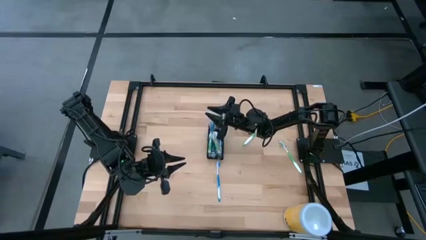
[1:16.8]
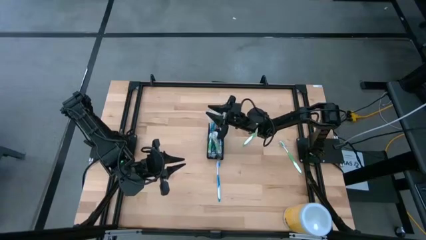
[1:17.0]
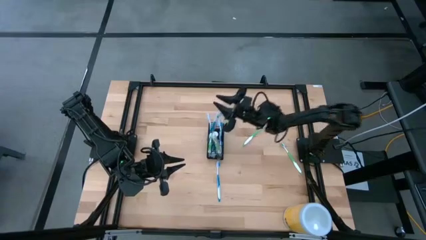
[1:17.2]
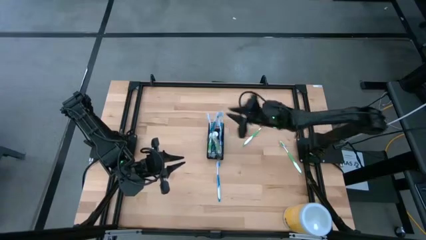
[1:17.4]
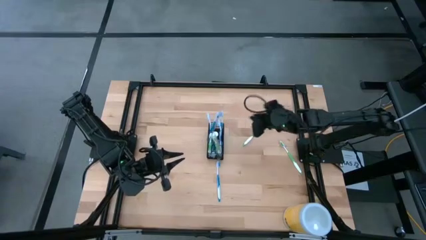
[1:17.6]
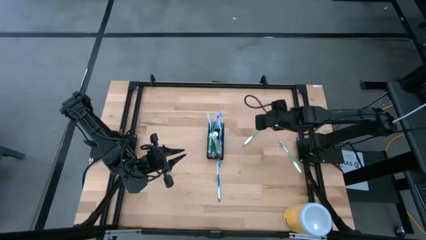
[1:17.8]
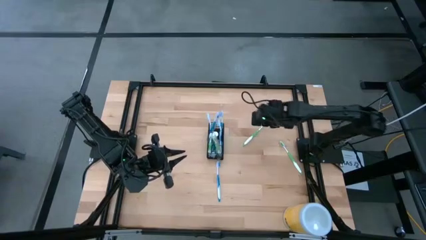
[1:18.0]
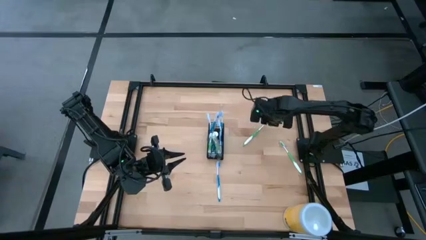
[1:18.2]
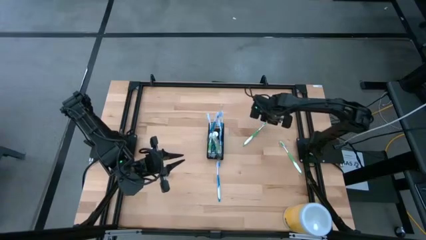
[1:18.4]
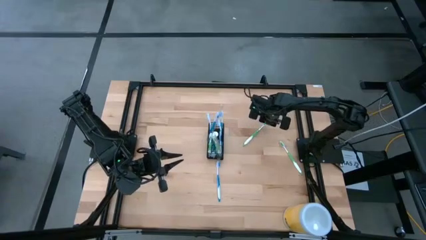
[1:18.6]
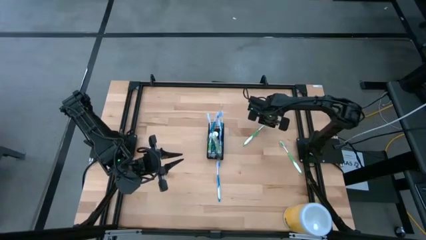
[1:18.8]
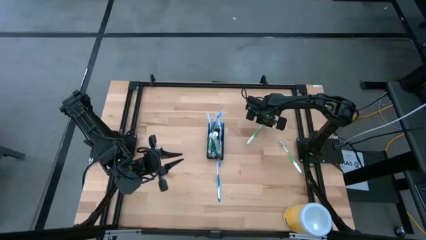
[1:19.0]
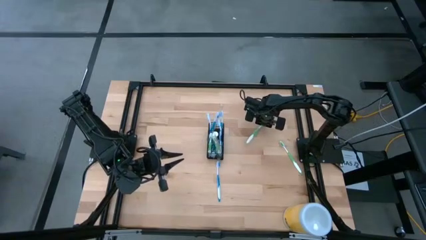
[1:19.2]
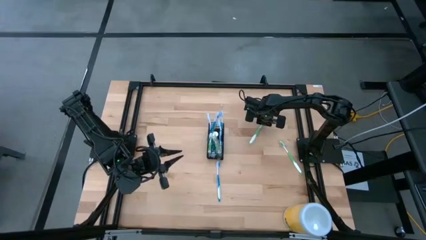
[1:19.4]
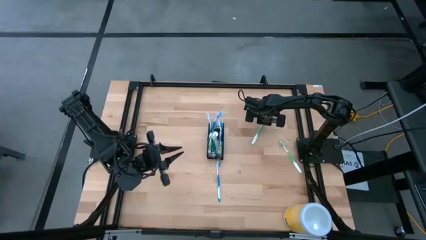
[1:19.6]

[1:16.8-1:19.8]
Task: Pick & Place toothbrushing station
Put the green toothbrush into the black organizer

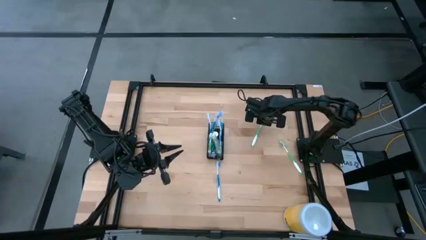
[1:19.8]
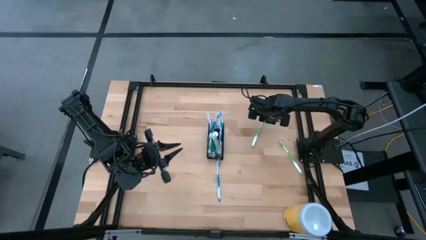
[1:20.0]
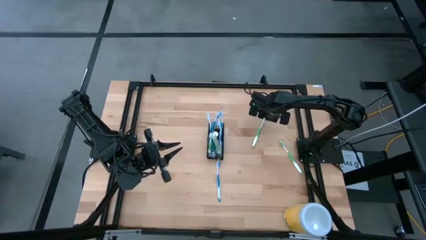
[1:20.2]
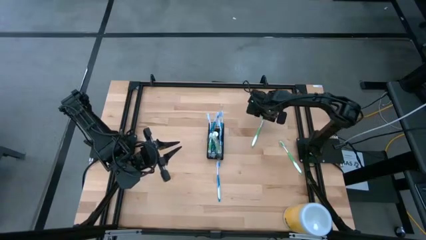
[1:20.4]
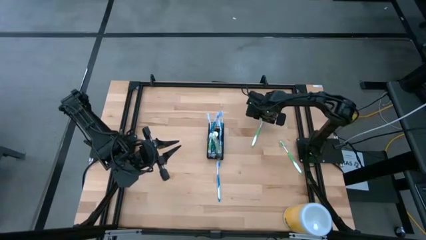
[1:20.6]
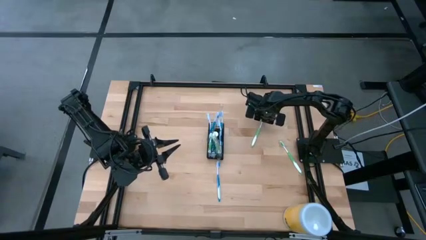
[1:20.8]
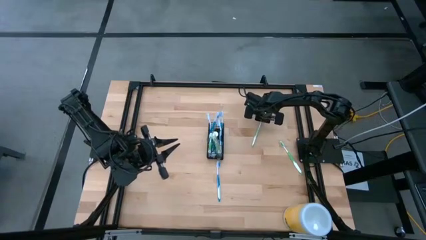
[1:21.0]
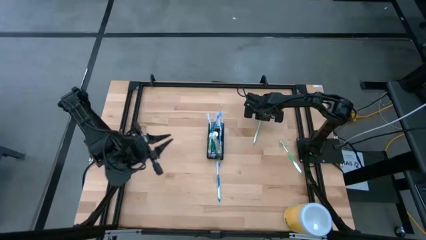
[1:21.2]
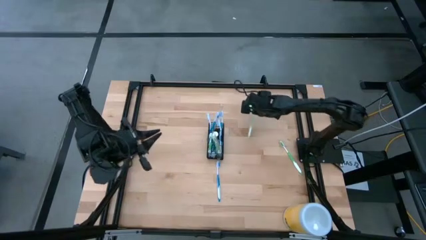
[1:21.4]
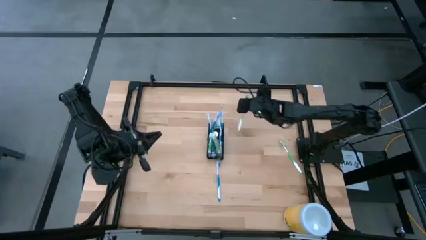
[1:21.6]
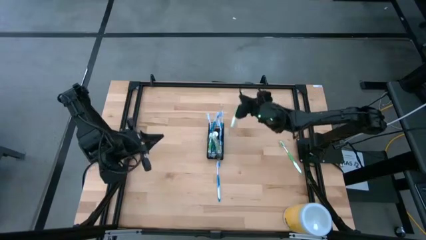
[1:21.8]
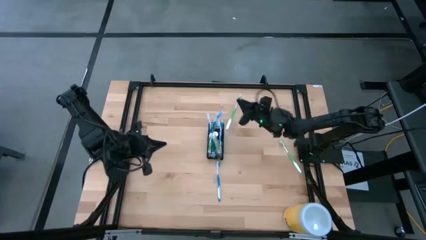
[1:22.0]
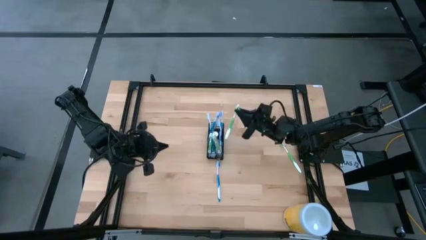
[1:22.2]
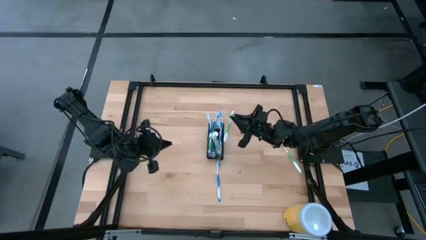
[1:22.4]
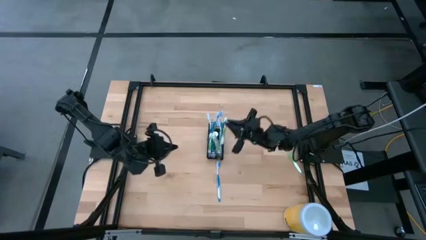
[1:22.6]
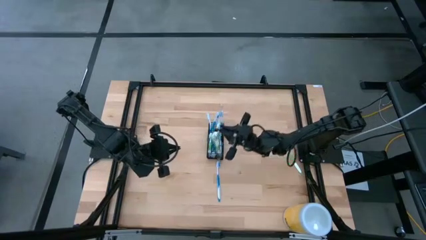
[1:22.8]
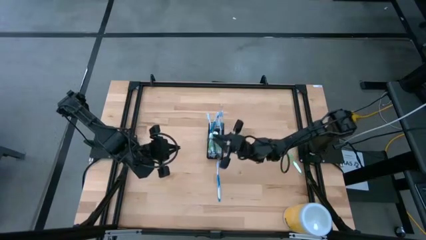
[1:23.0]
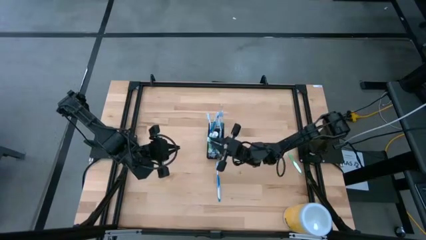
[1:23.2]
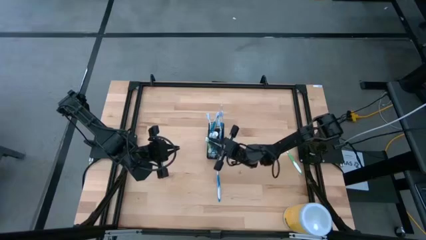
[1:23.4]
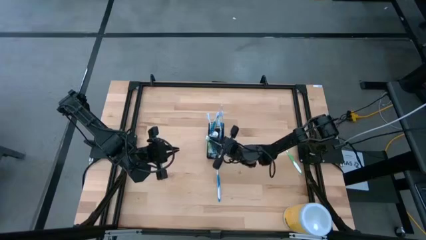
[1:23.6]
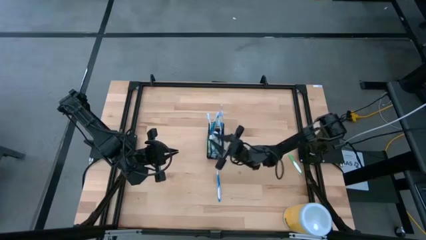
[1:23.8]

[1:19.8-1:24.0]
Put the green toothbrush into the black organizer

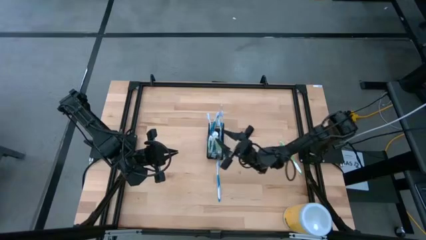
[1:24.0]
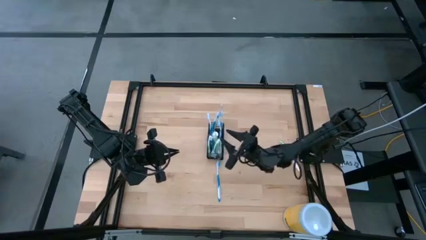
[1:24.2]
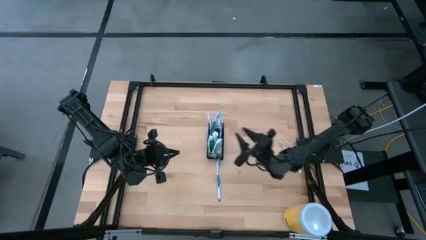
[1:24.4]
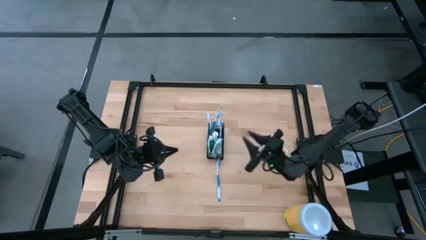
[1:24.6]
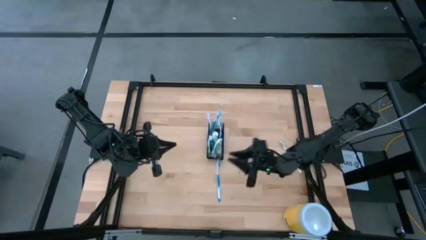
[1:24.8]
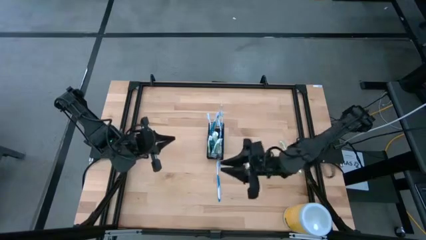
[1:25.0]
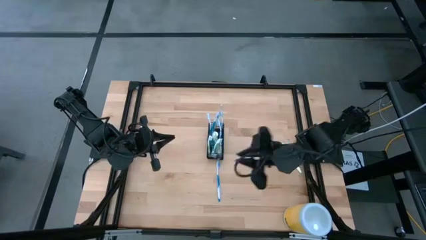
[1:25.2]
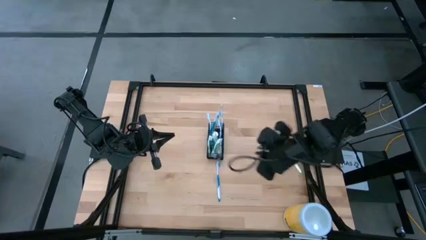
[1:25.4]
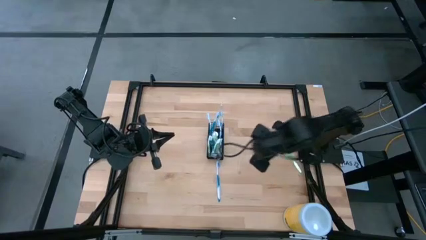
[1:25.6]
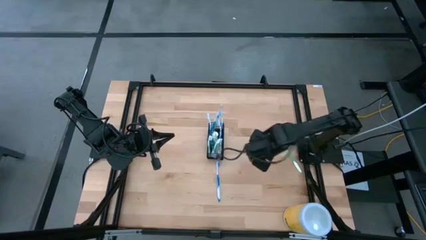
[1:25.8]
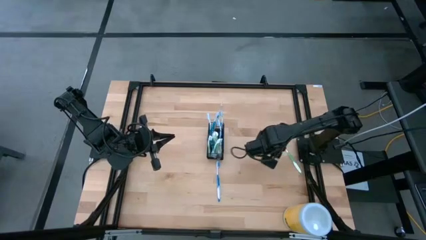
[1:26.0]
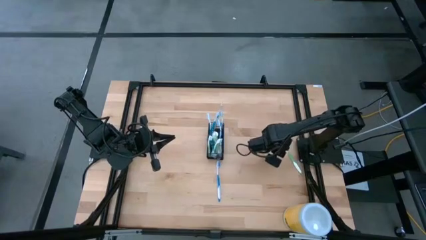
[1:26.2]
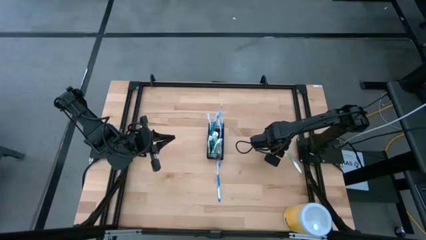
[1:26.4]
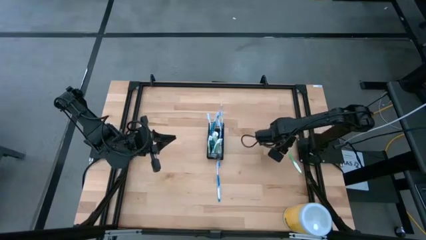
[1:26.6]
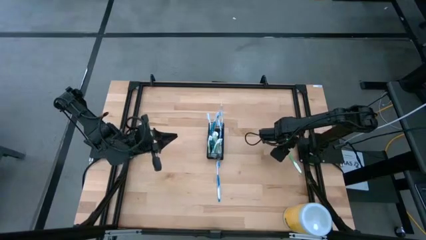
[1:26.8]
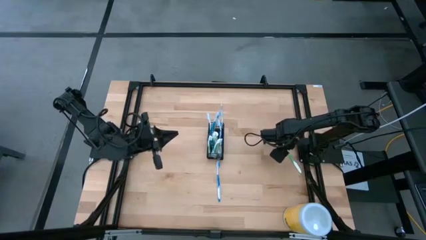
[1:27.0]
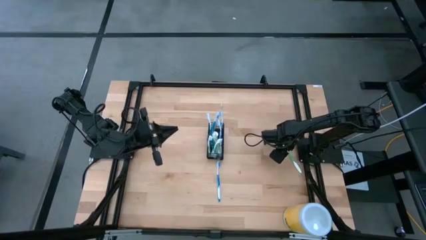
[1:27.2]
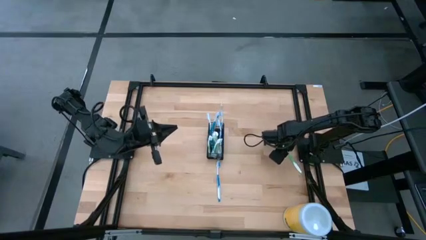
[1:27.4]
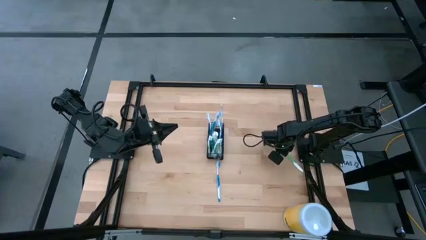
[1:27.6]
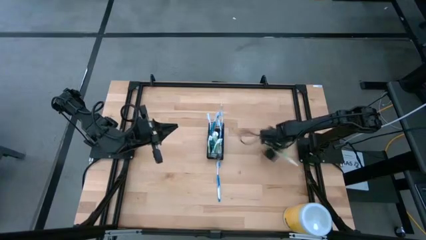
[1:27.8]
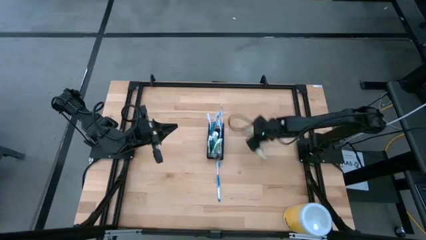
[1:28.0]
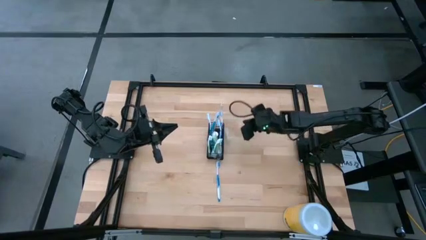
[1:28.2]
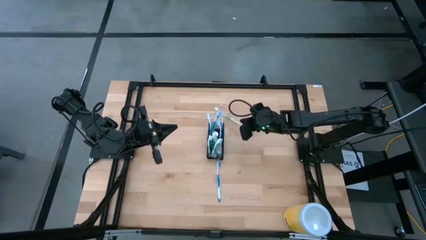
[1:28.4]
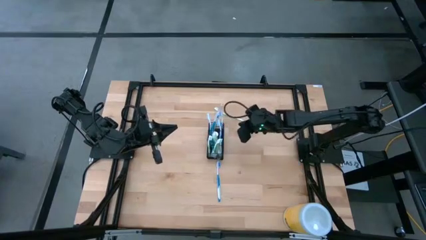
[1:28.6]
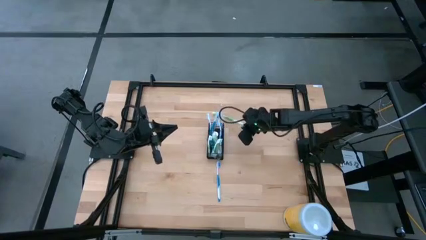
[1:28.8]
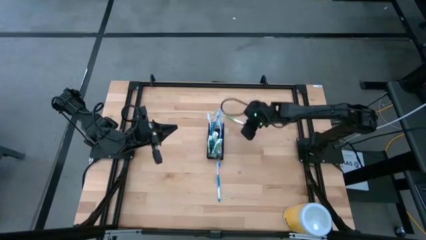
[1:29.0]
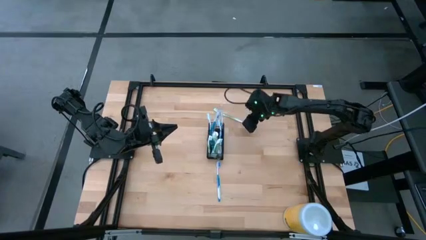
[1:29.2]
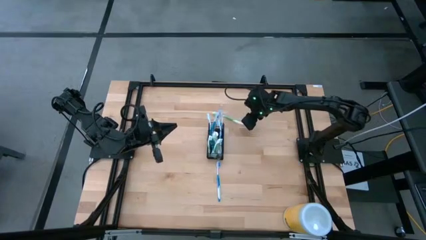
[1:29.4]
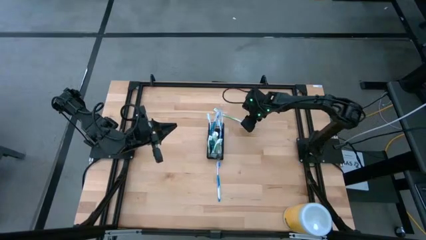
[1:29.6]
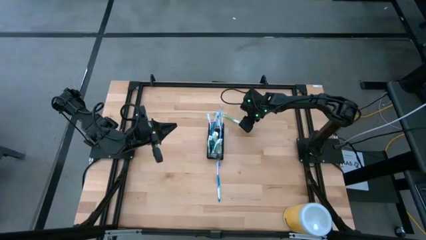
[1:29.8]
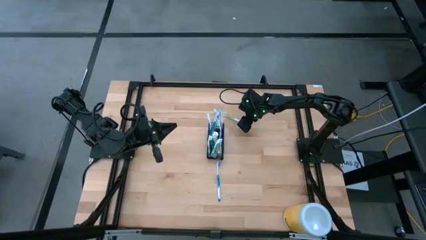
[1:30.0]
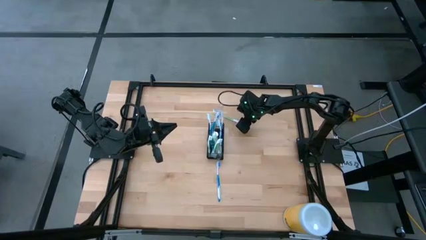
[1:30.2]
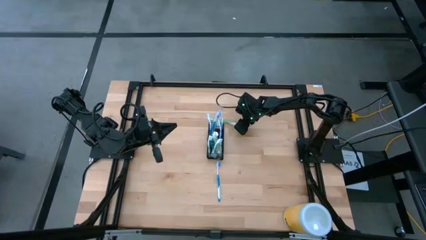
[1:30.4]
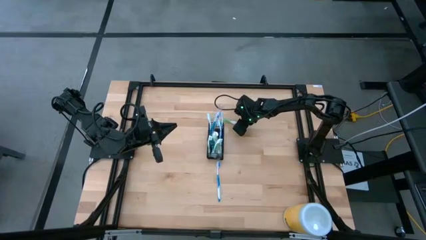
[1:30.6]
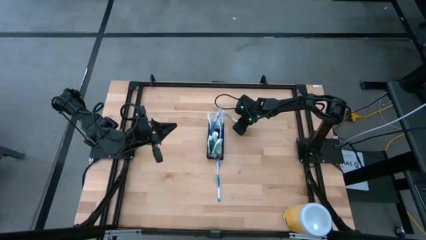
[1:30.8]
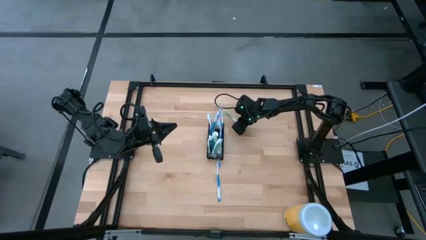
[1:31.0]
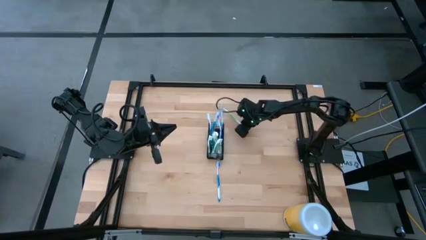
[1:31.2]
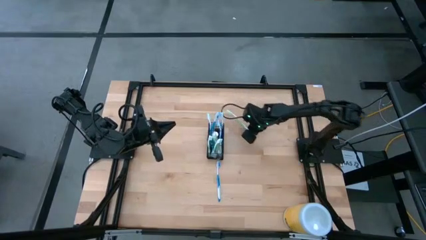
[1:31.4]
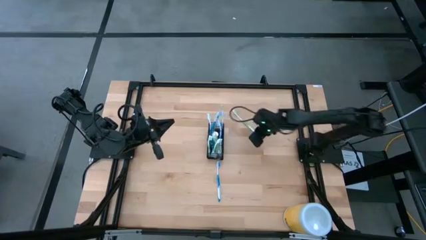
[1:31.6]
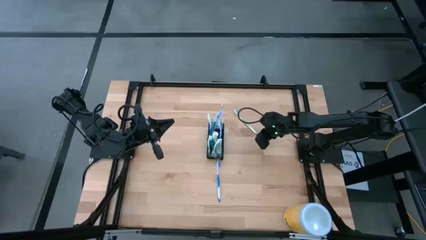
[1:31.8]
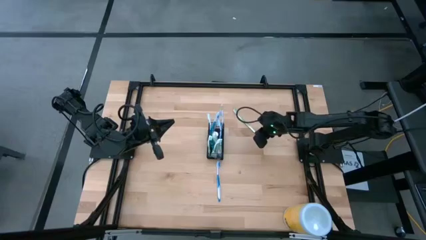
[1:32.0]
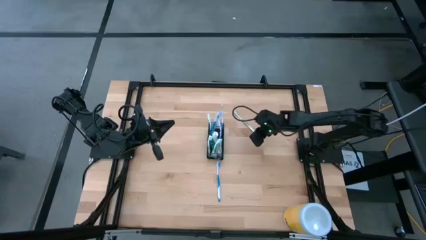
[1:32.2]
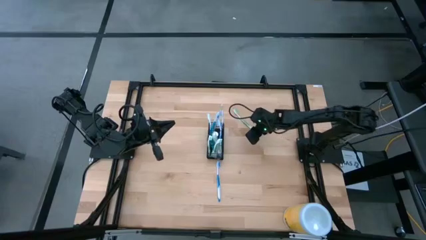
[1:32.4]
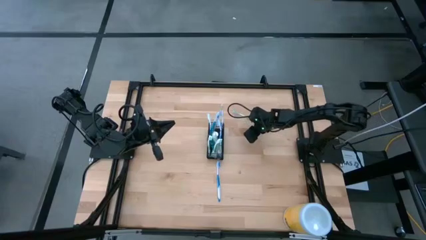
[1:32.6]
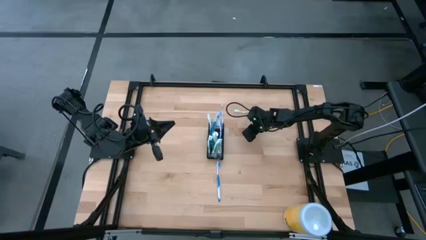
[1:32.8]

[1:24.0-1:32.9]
Put the green toothbrush into the black organizer

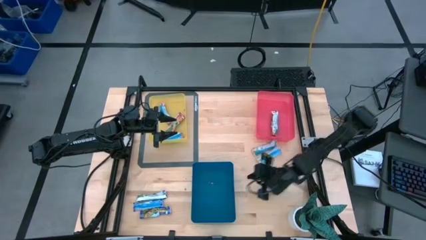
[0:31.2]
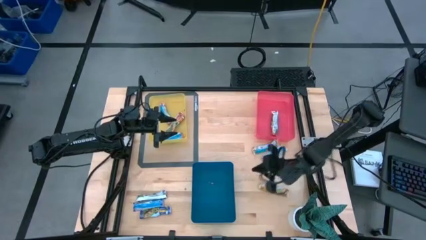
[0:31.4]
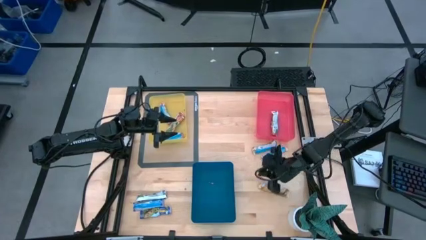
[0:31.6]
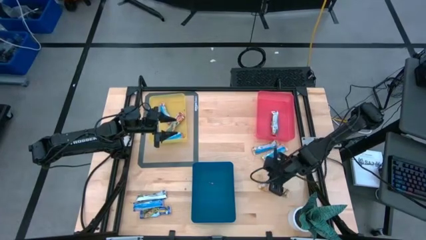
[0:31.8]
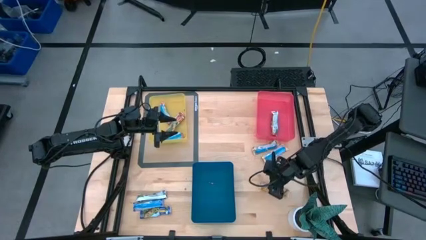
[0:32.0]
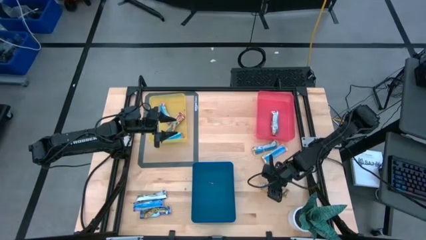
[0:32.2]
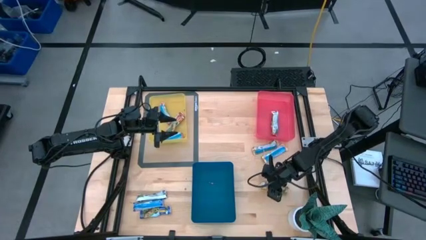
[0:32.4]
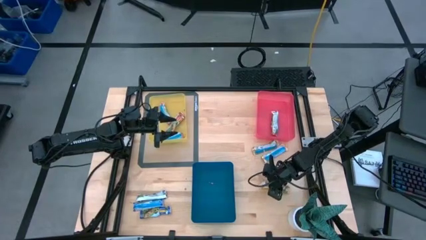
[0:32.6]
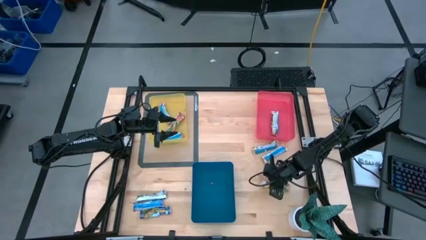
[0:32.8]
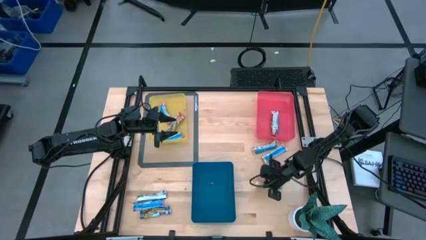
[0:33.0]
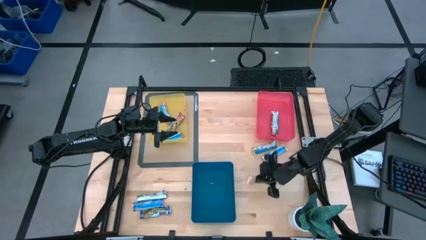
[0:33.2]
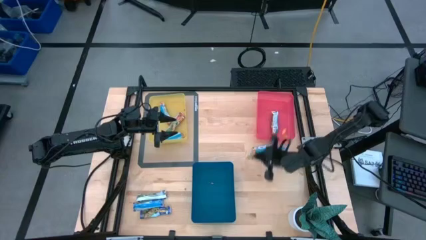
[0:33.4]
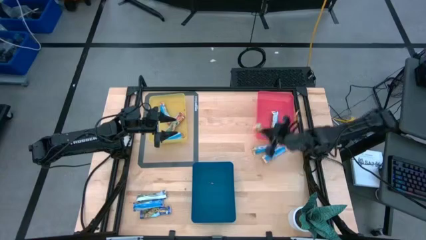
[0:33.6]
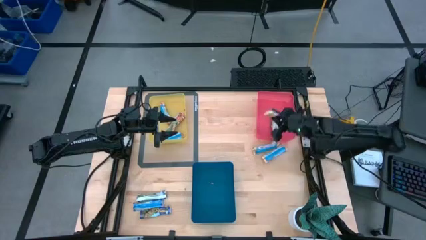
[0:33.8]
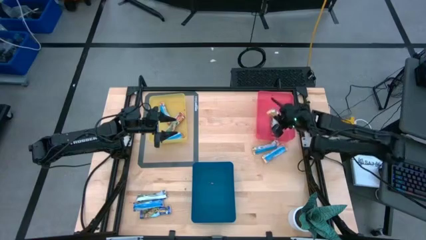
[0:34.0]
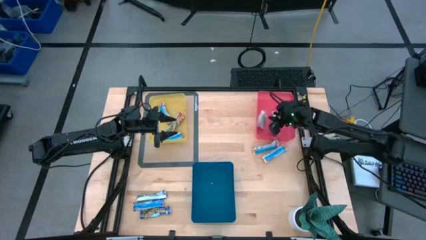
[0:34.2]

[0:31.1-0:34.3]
Task: Pick and place Granola Bars by type
Put the yellow granola bar into the red bin
